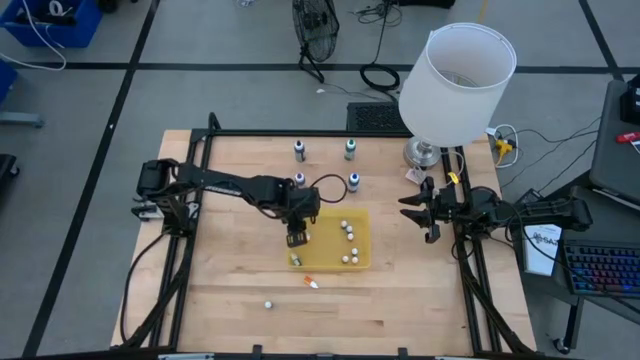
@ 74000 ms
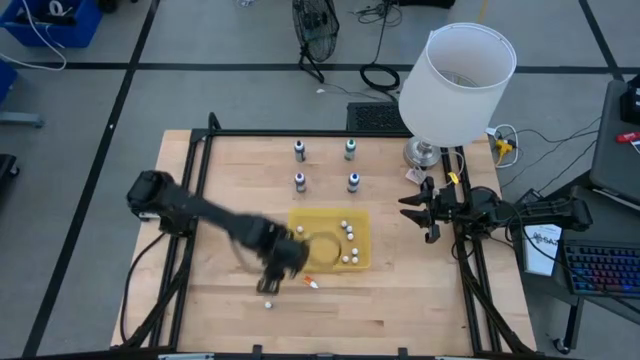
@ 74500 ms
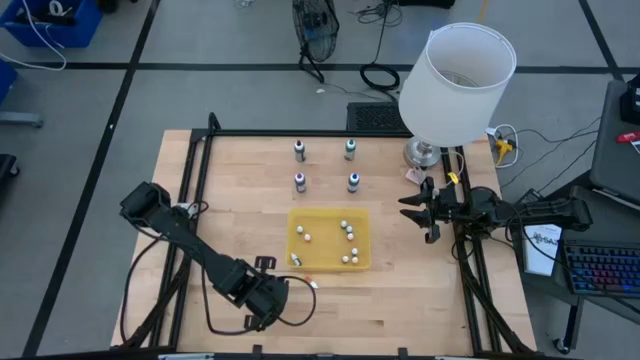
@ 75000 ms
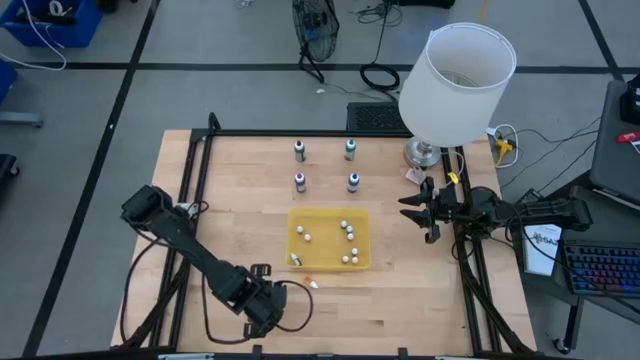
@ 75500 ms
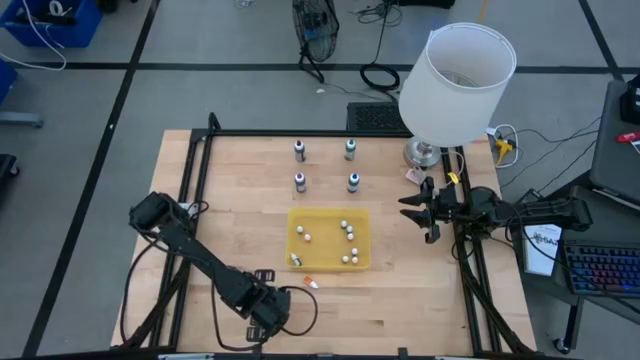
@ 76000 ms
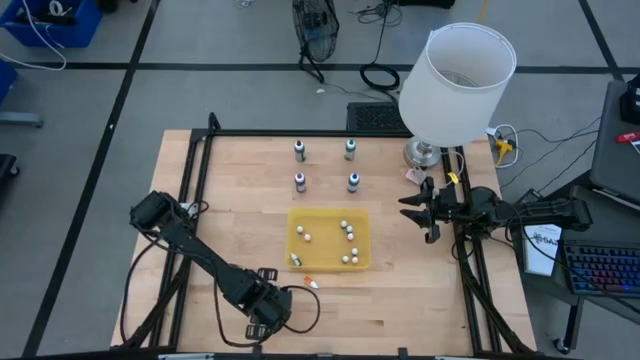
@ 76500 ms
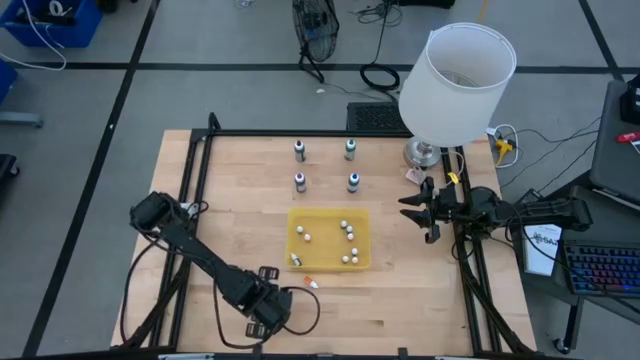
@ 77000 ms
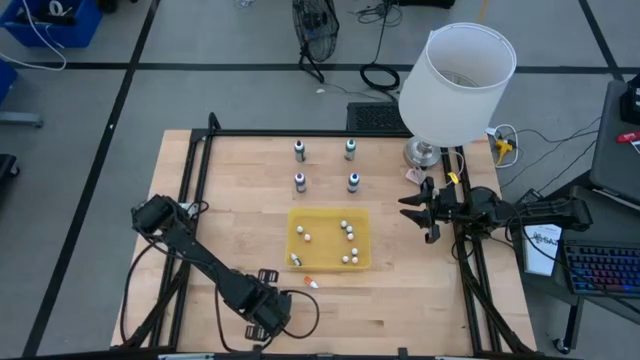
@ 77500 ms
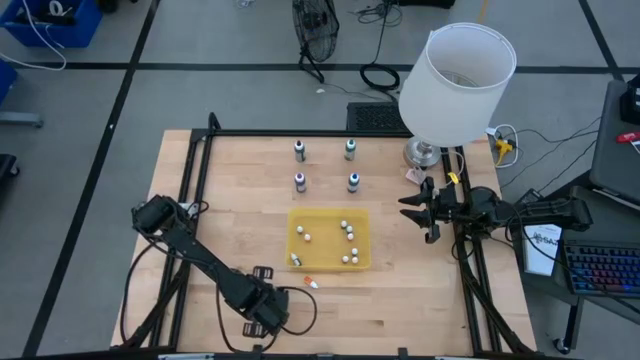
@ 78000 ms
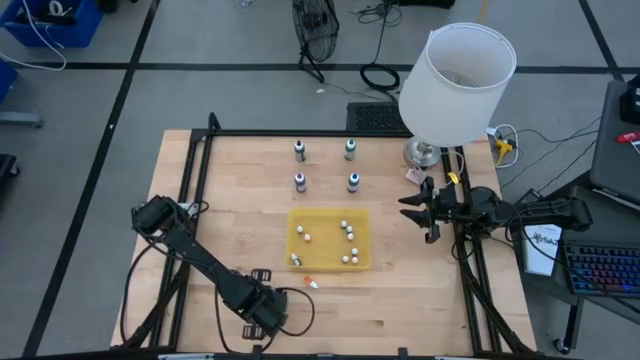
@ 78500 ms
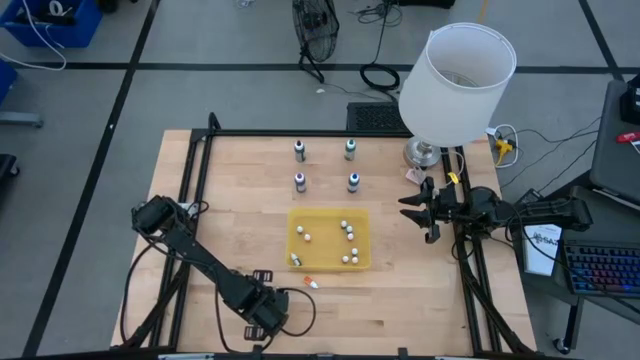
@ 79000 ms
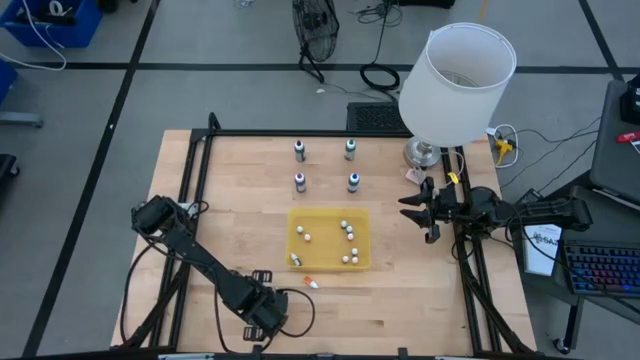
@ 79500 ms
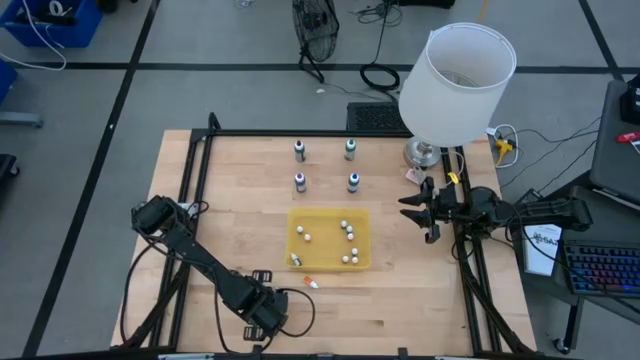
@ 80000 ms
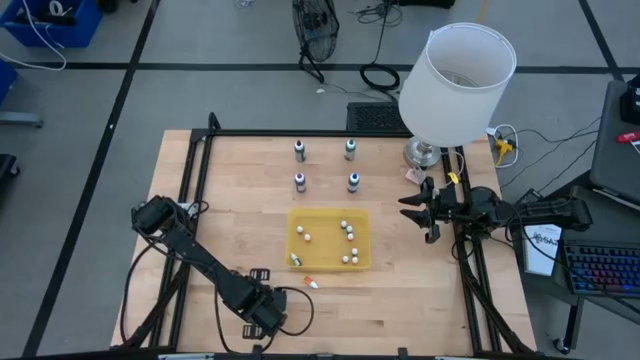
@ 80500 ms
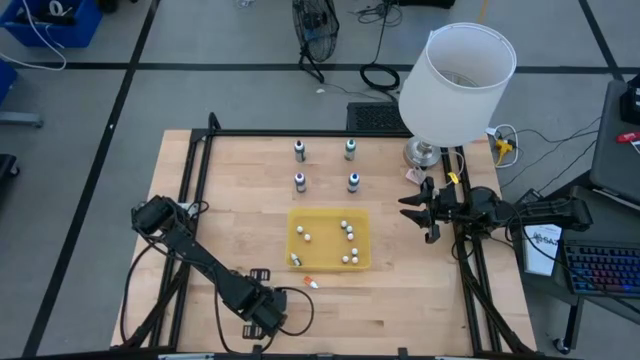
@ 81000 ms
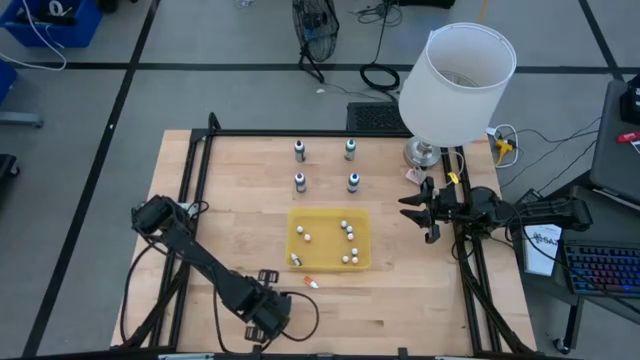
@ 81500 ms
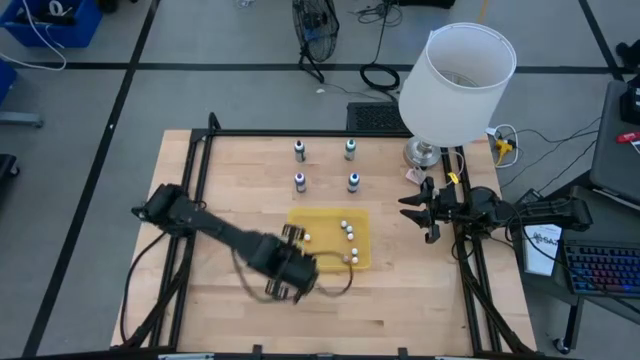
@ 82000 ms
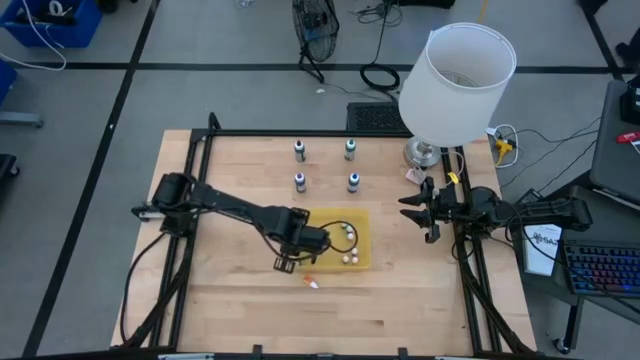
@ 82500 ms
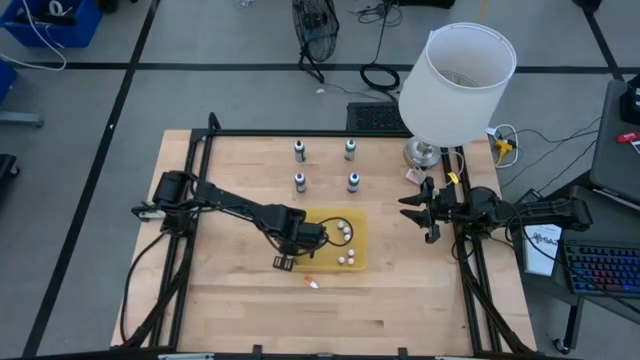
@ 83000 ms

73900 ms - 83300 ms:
Task: Pick & Place food coloring
Put the small purple food coloring bottle into the yellow container

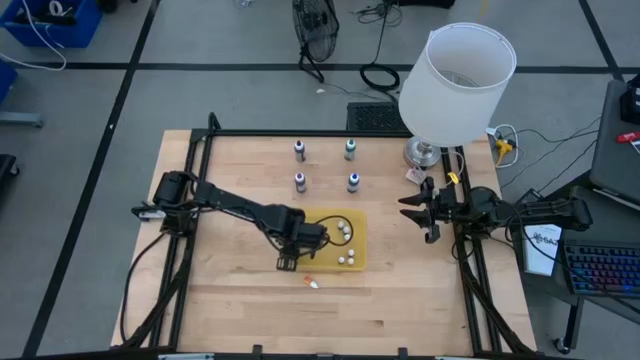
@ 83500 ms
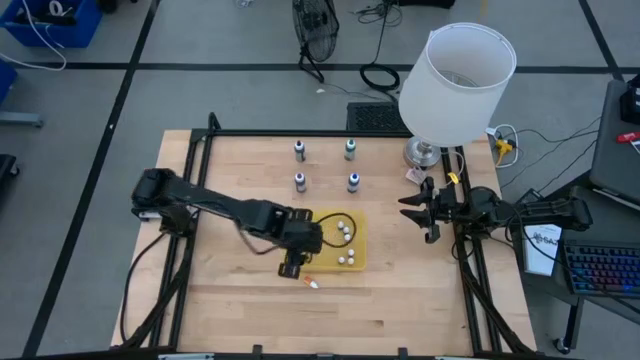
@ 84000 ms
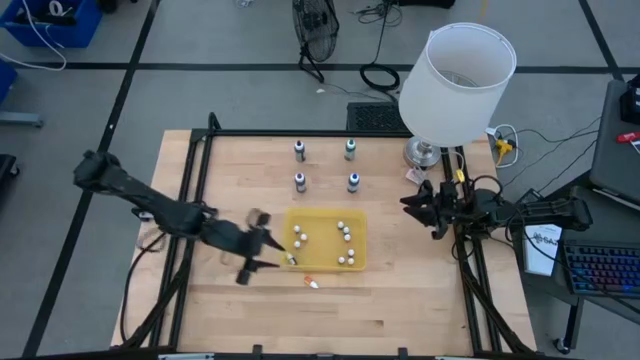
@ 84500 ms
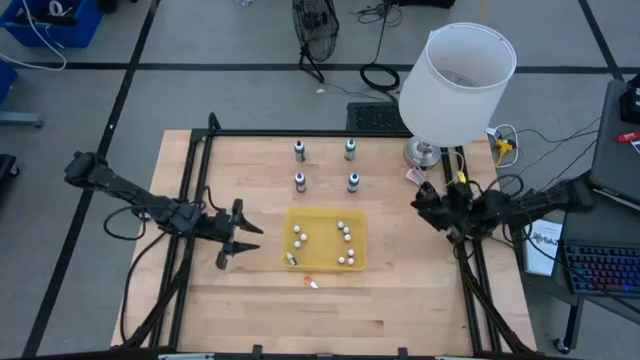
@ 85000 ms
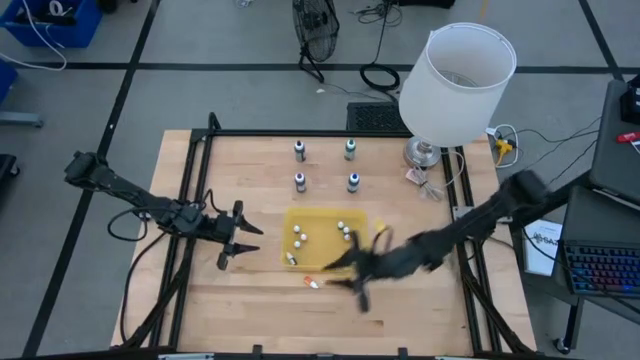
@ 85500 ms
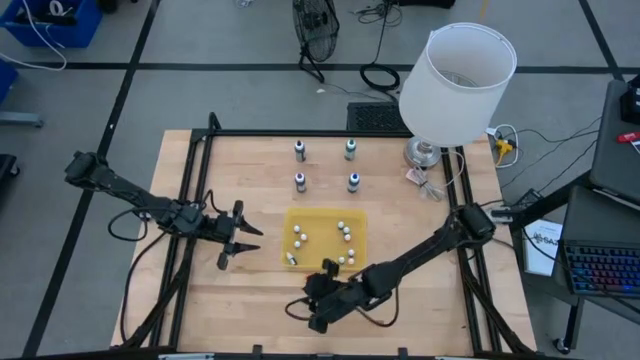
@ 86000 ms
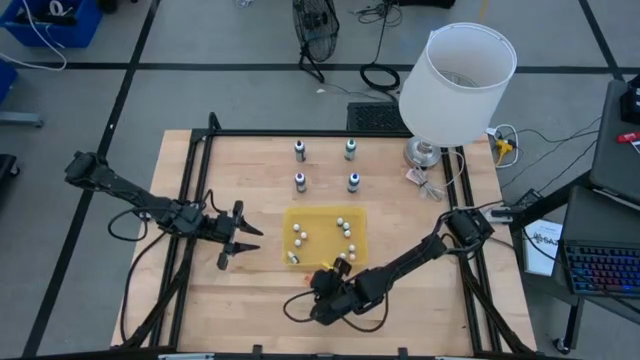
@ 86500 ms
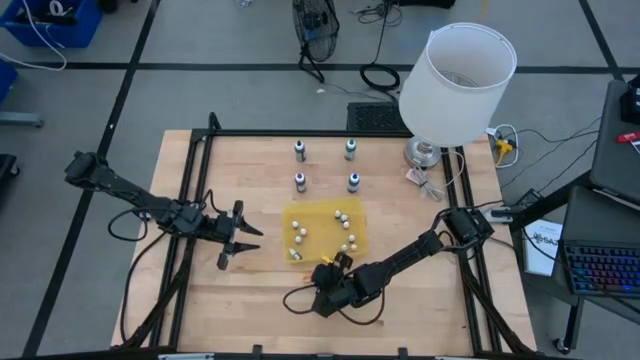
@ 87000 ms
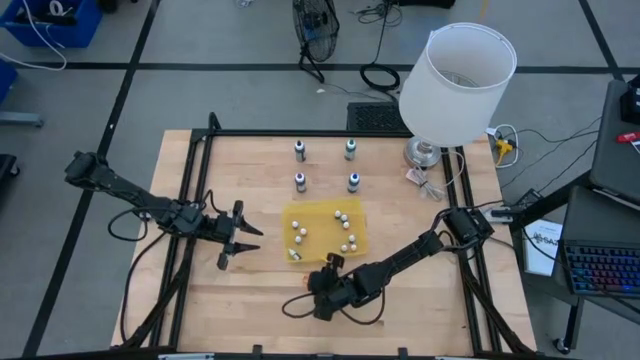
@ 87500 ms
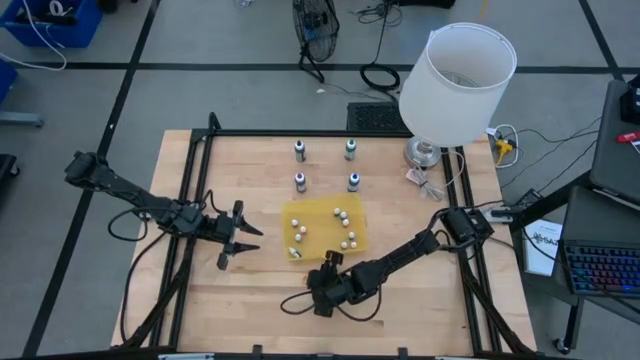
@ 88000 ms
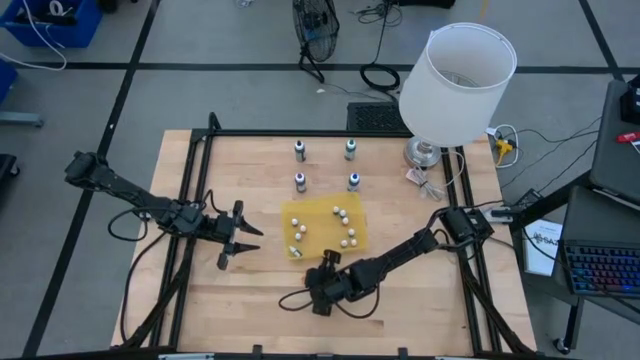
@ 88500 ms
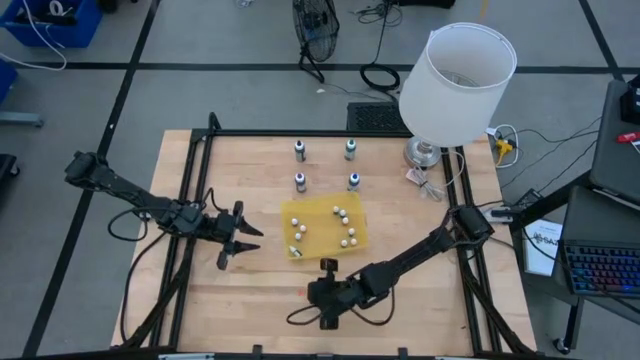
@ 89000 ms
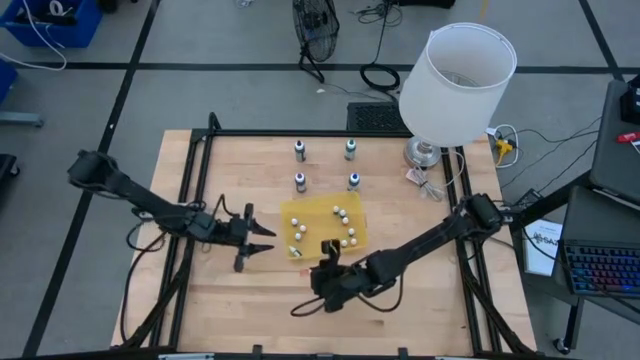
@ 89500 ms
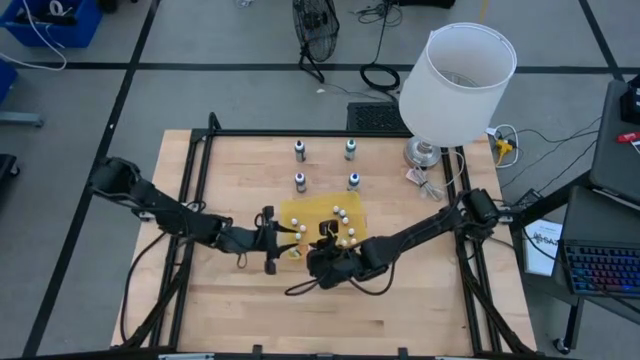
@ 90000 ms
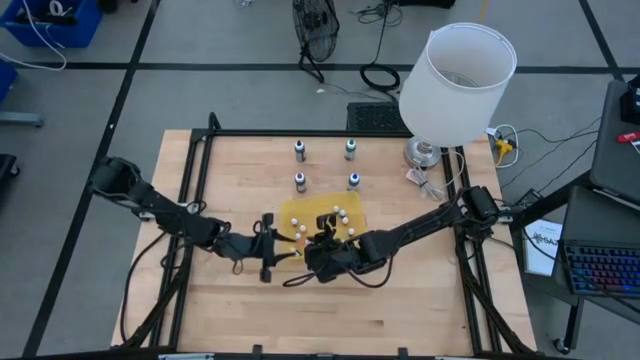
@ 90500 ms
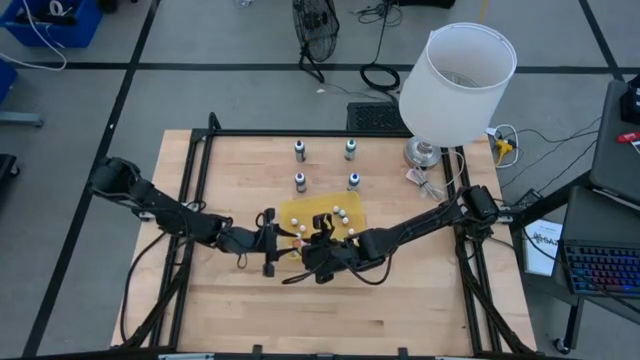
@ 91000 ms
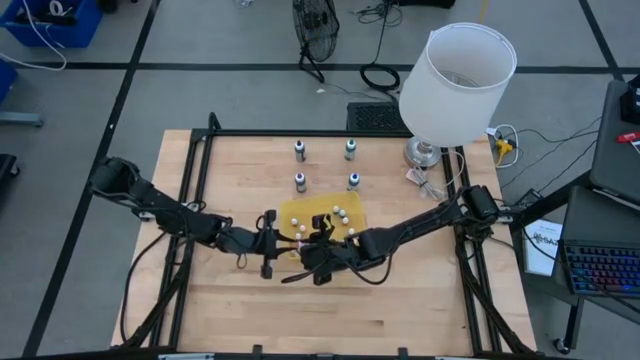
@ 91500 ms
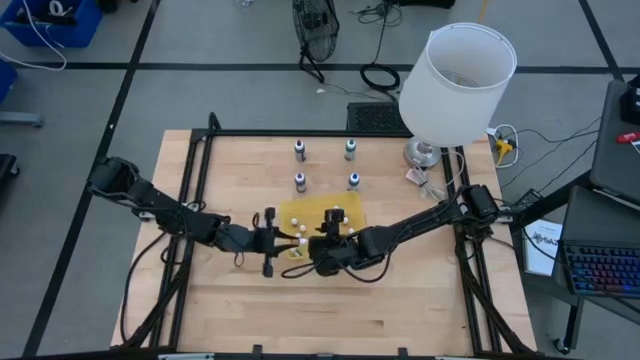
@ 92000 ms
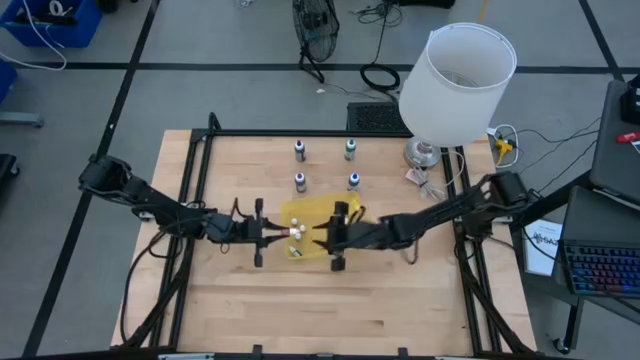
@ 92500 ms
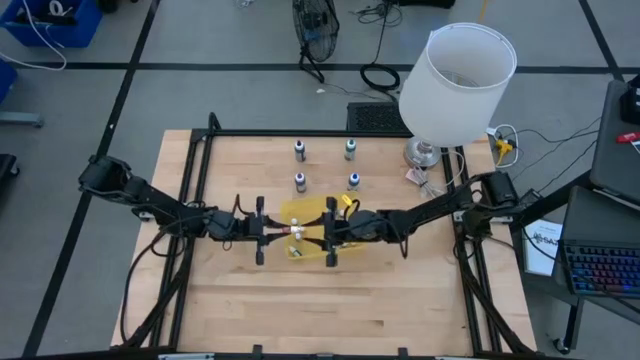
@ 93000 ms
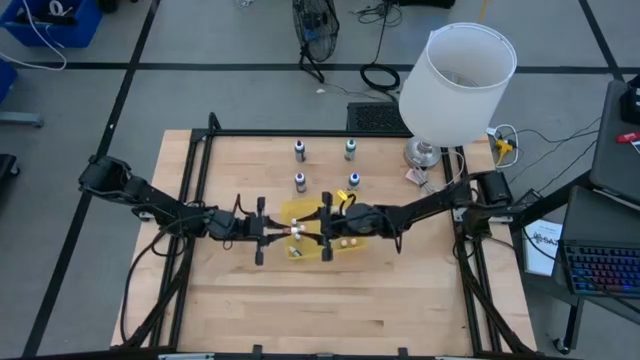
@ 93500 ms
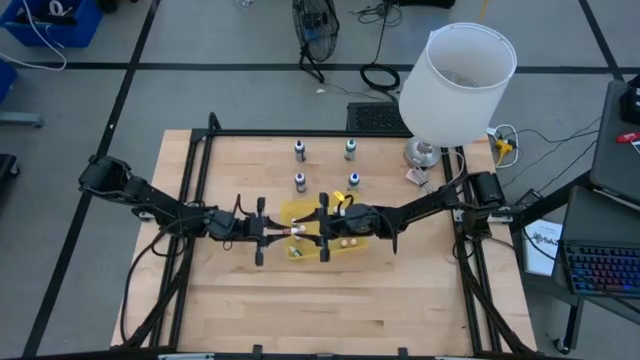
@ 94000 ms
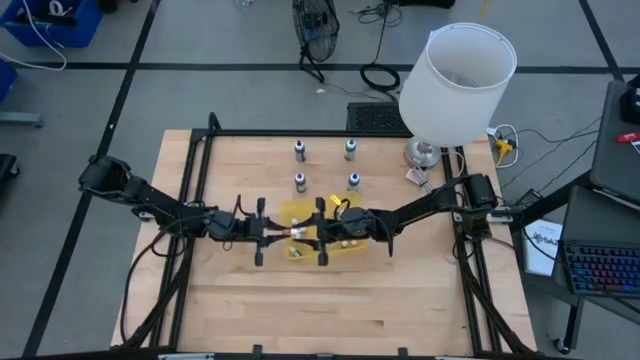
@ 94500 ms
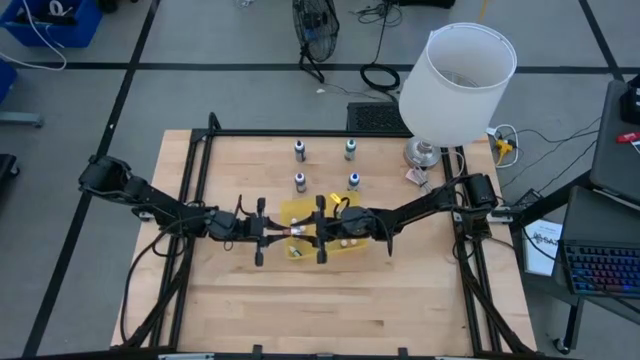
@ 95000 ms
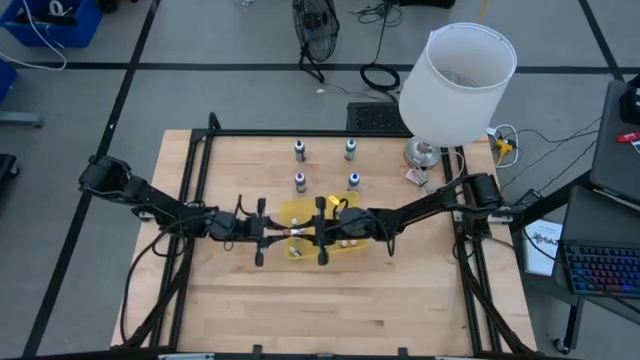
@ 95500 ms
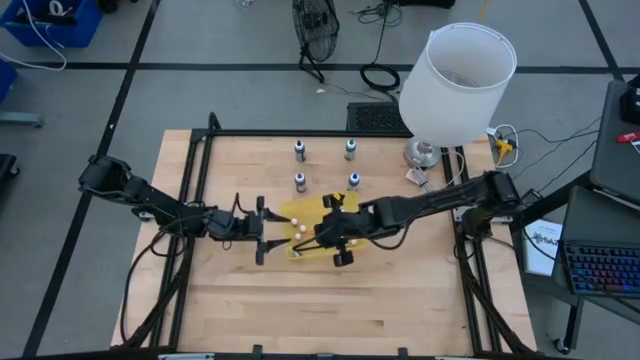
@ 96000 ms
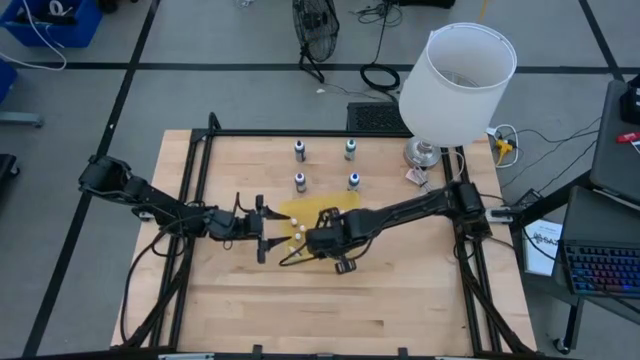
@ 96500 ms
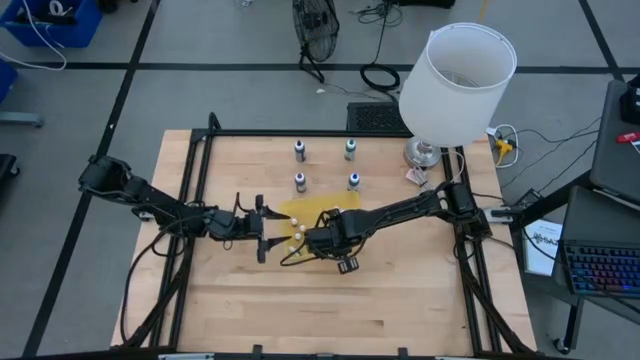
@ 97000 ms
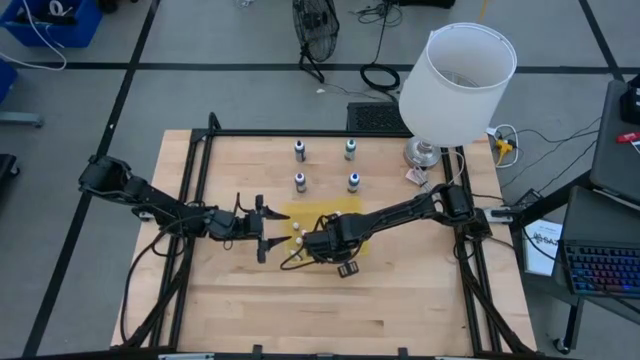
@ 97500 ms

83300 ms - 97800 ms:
Put the small yellow food coloring bottle into the yellow container
